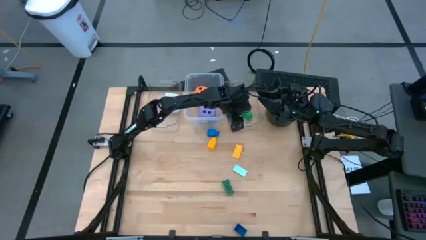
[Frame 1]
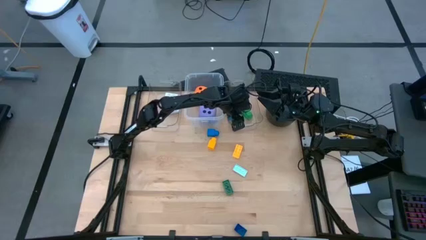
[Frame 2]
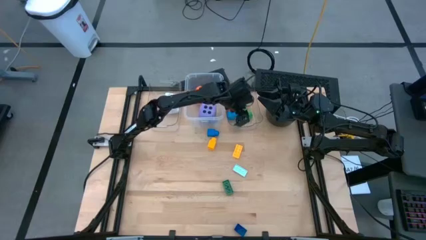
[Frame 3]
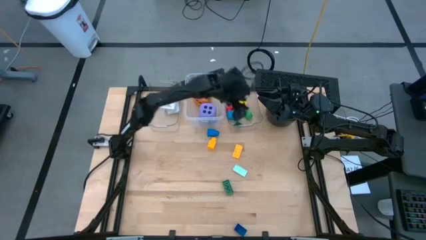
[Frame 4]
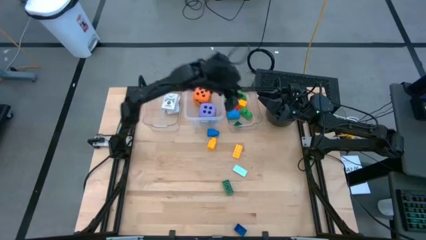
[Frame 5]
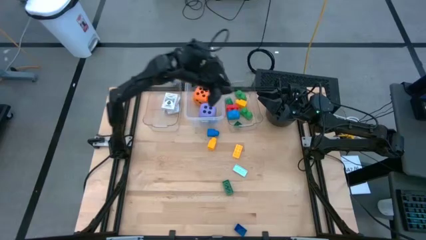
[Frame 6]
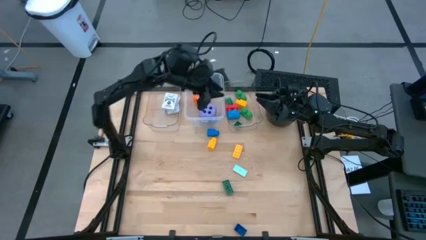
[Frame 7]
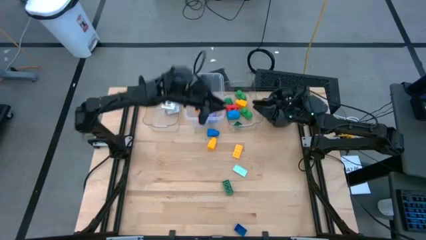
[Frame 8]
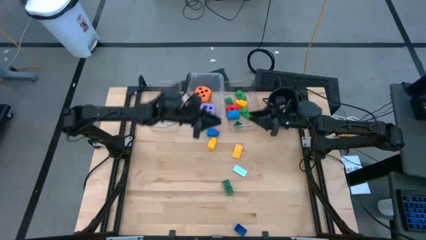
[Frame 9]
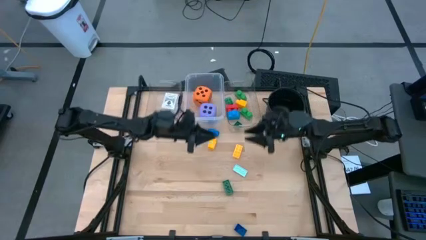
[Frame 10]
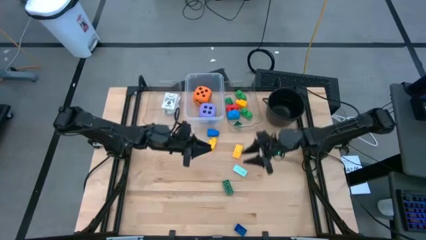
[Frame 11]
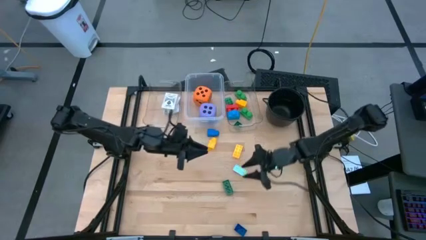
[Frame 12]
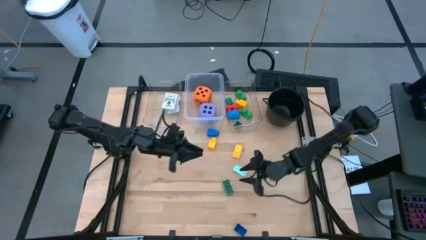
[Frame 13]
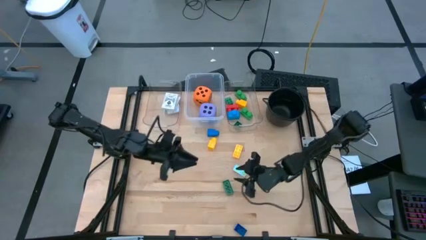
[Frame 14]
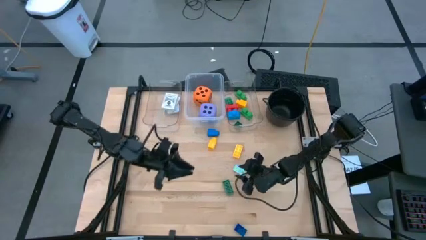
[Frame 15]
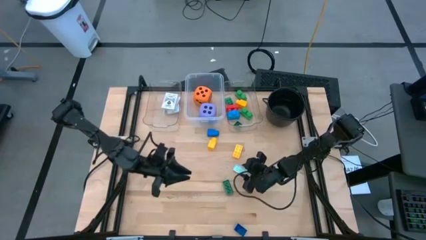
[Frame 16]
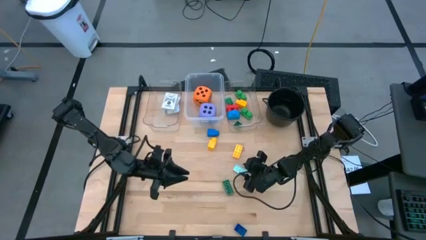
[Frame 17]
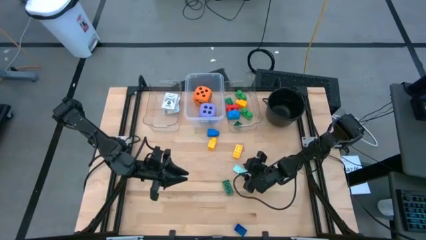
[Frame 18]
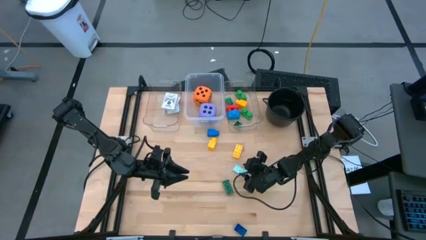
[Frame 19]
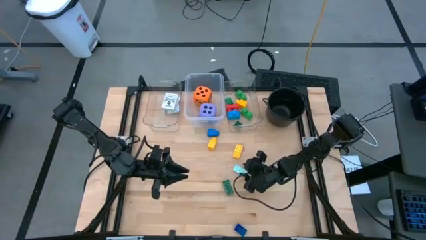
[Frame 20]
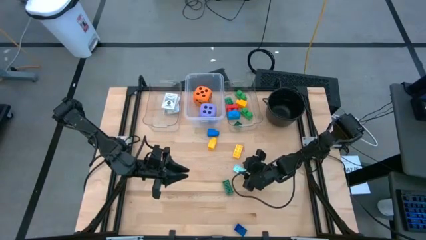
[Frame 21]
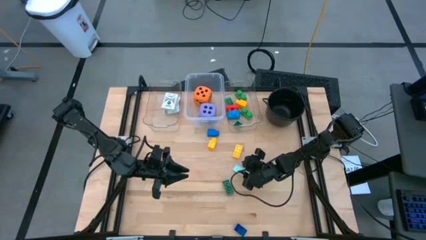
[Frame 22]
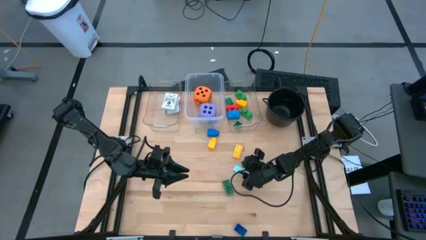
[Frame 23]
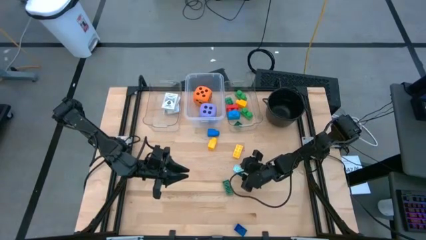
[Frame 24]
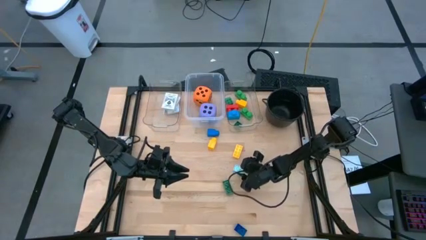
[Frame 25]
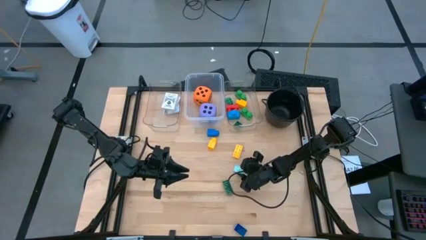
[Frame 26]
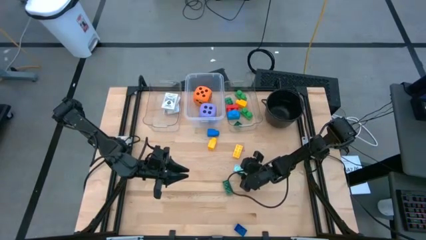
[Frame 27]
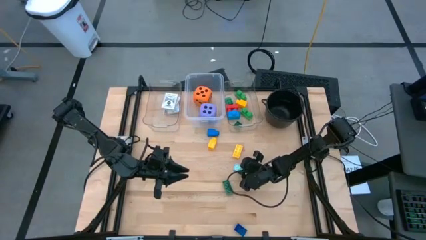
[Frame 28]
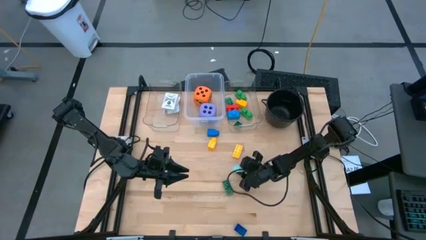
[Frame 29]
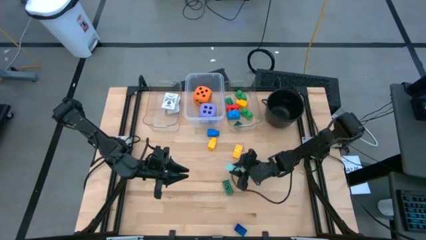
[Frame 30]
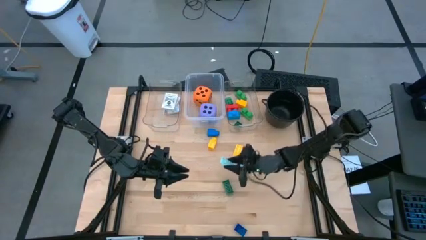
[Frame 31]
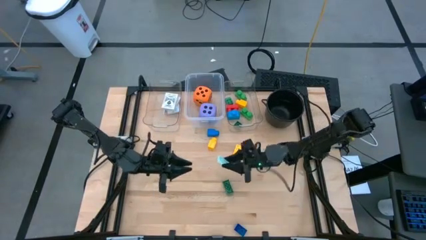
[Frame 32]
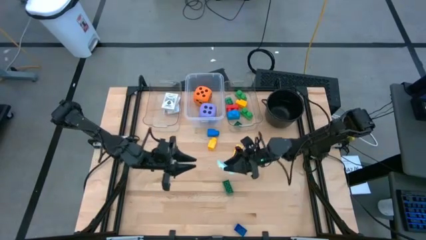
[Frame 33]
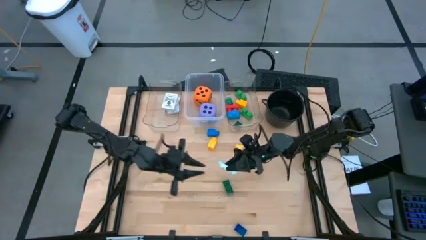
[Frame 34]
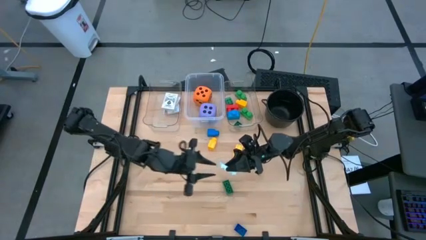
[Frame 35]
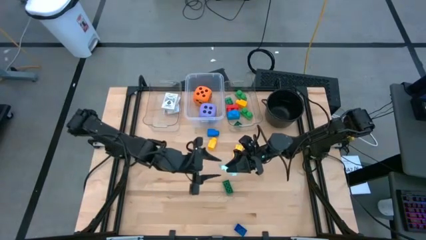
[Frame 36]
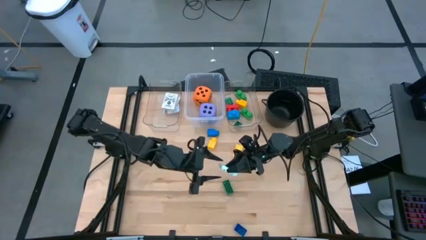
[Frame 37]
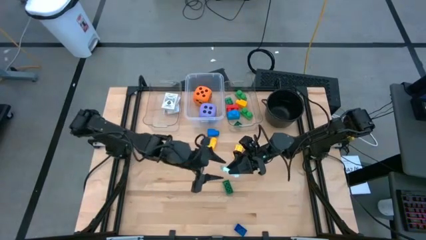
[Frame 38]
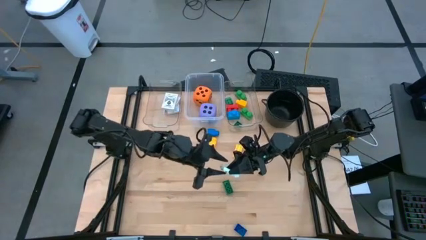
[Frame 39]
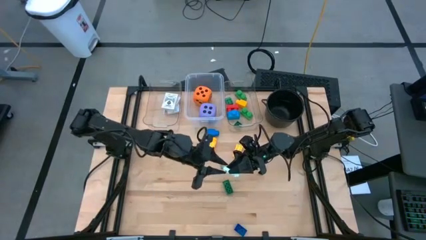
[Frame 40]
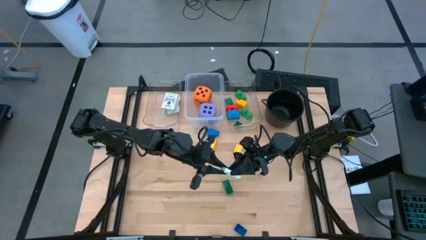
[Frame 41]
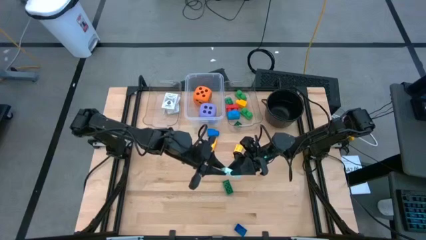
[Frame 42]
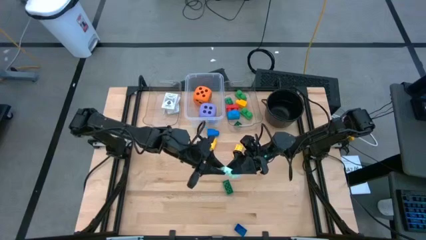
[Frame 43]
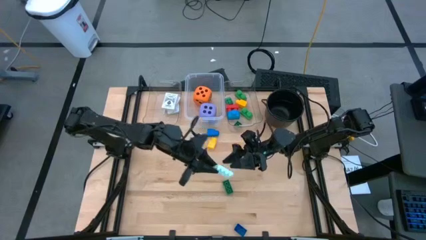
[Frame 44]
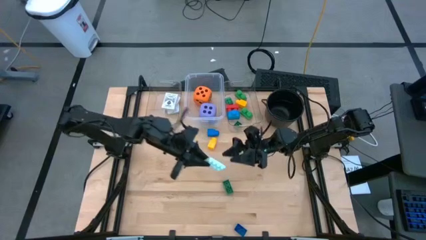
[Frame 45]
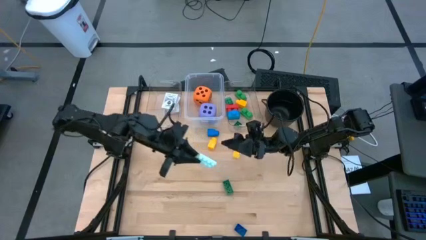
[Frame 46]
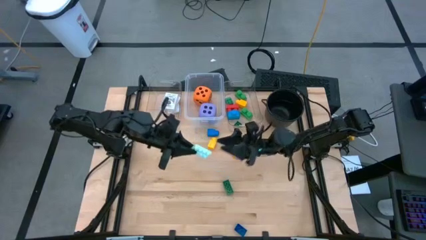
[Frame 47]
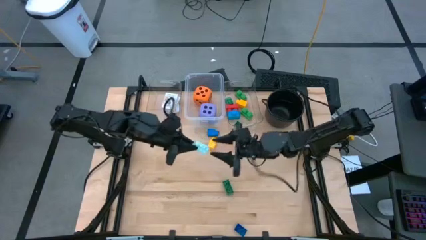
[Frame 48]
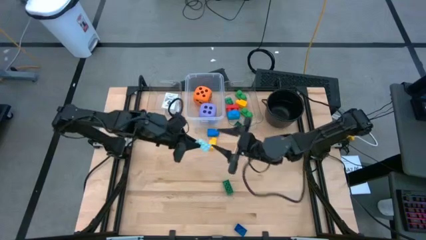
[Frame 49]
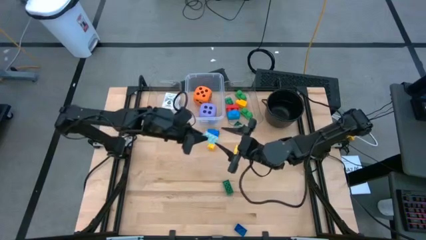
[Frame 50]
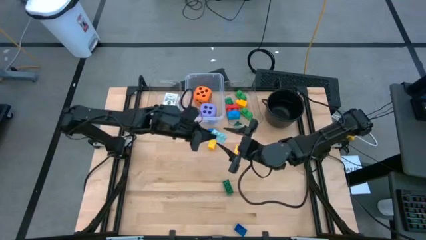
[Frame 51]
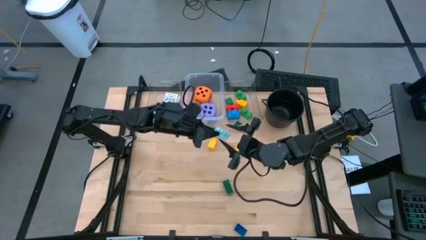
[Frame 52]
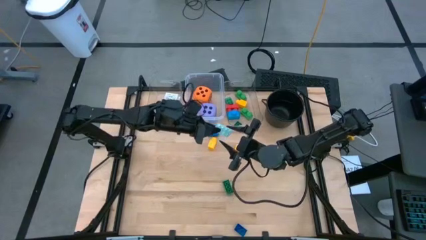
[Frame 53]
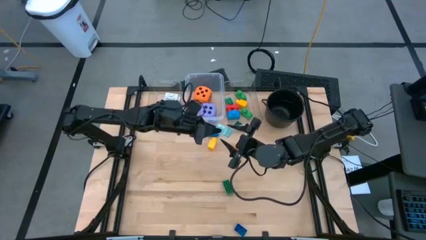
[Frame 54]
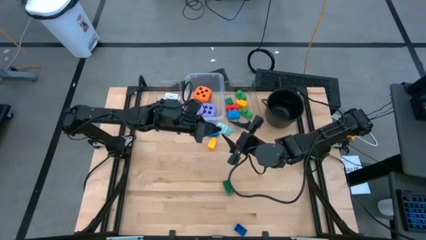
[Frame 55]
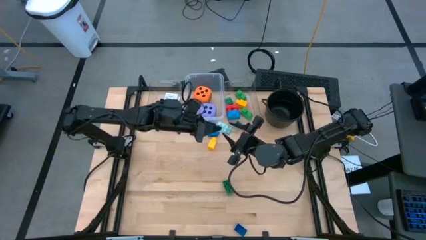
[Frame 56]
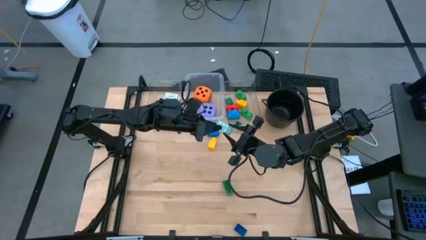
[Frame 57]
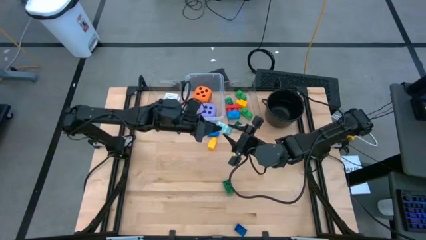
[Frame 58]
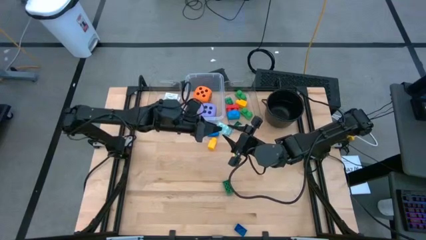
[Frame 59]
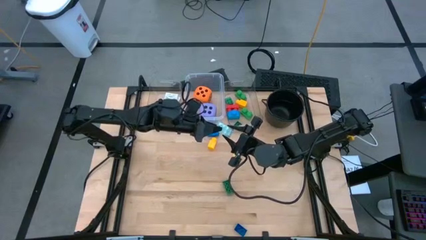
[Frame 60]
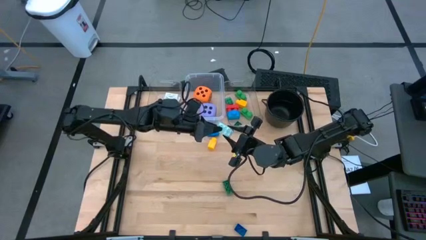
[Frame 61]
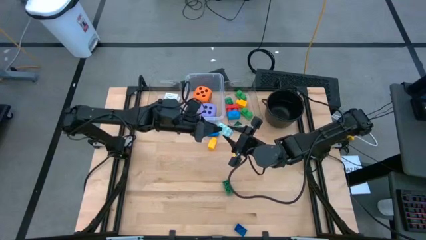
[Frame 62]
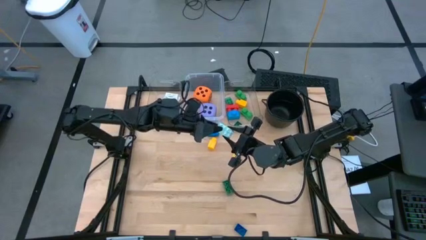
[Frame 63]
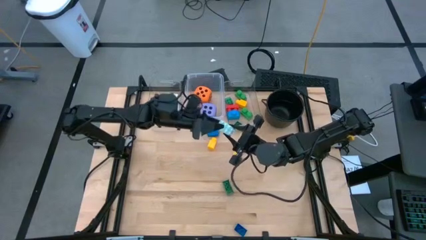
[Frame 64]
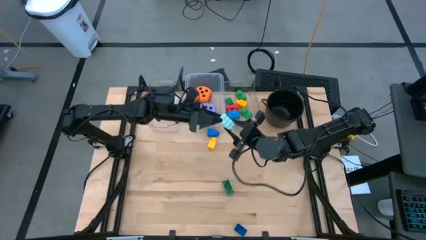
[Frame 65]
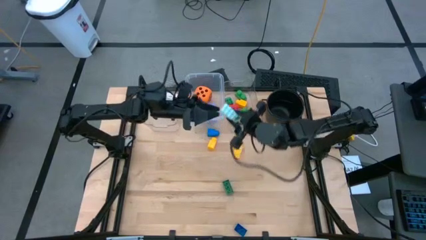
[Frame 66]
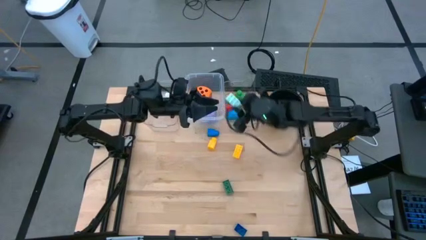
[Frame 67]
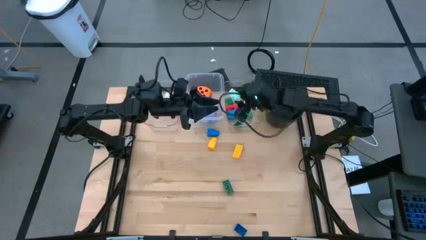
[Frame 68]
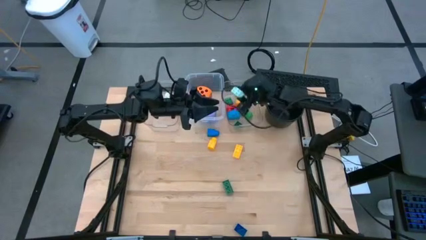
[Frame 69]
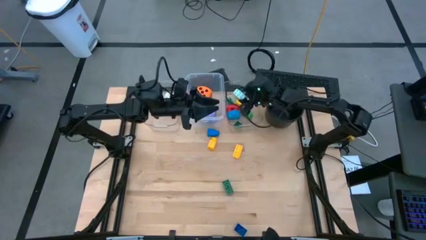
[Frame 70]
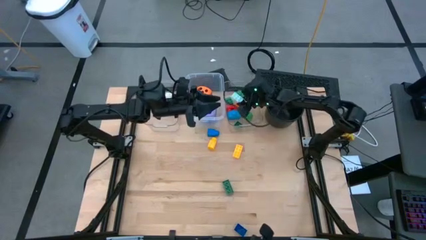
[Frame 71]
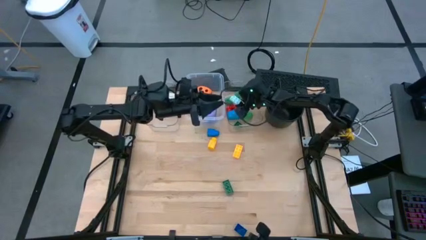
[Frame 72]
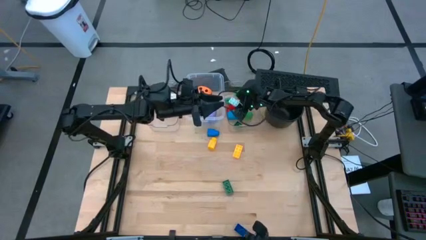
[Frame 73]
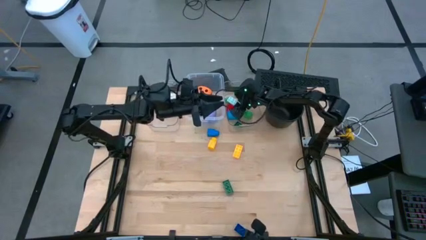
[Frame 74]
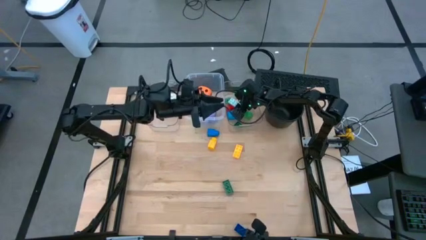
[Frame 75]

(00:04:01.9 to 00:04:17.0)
Task: Pick & Place Toys
Put the light blue green game piece into the right transparent bin
